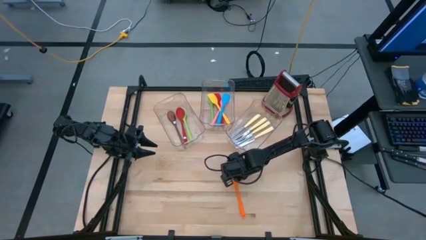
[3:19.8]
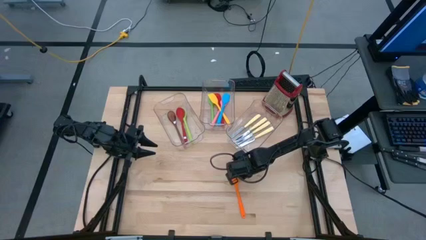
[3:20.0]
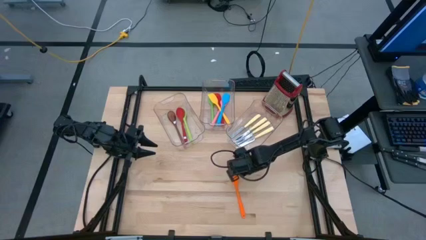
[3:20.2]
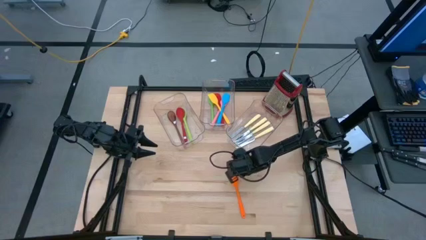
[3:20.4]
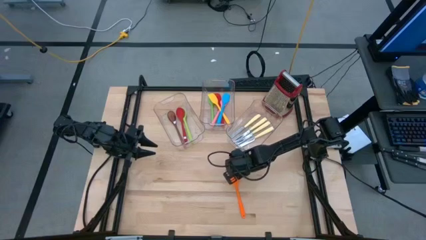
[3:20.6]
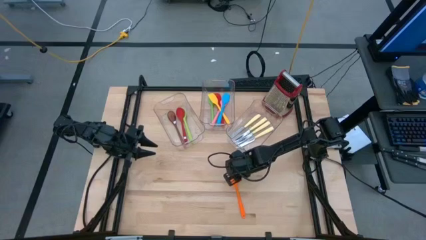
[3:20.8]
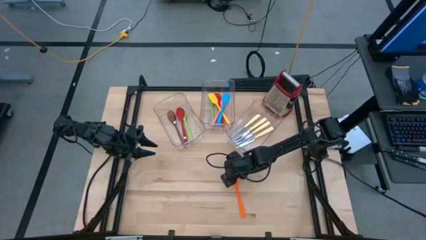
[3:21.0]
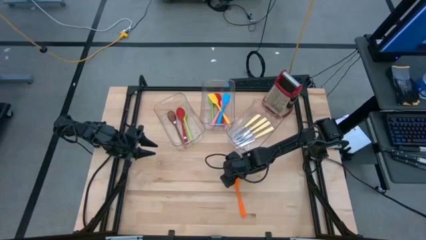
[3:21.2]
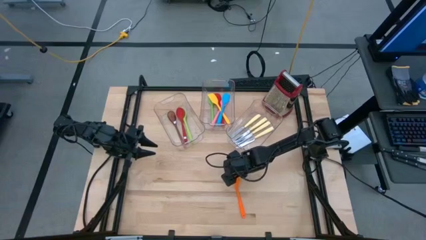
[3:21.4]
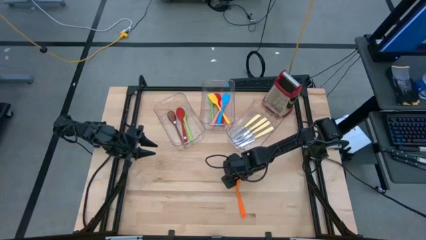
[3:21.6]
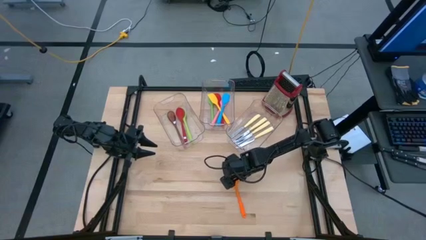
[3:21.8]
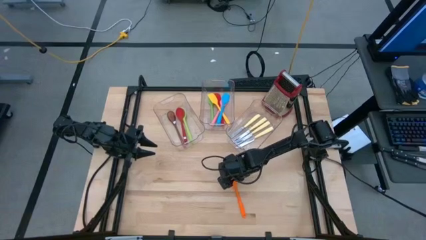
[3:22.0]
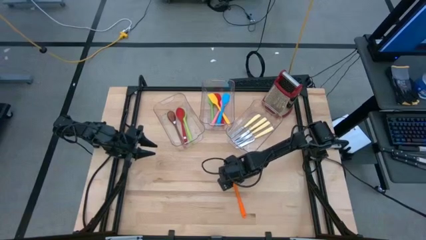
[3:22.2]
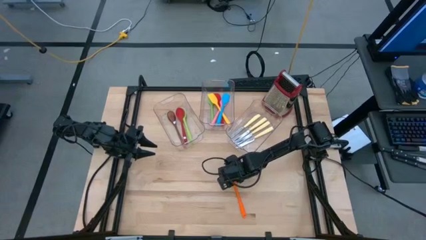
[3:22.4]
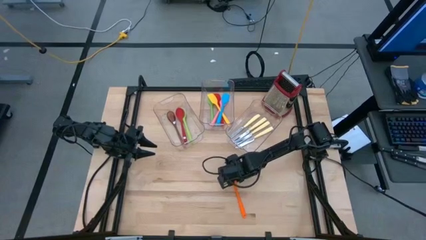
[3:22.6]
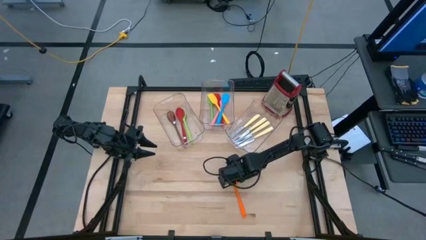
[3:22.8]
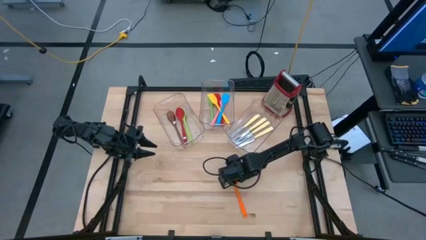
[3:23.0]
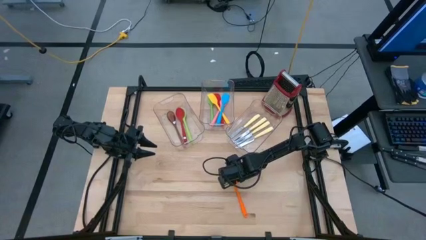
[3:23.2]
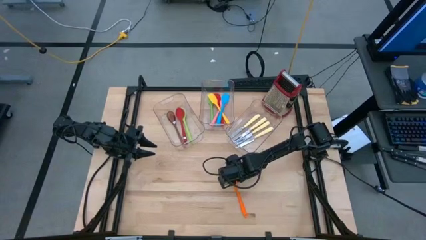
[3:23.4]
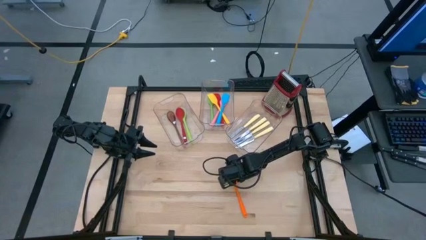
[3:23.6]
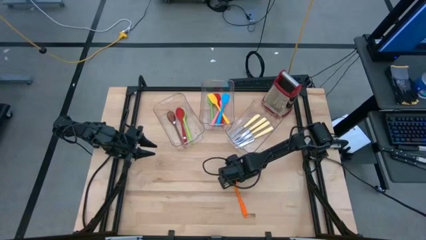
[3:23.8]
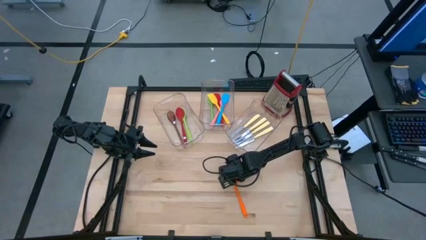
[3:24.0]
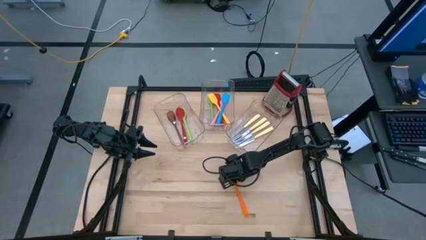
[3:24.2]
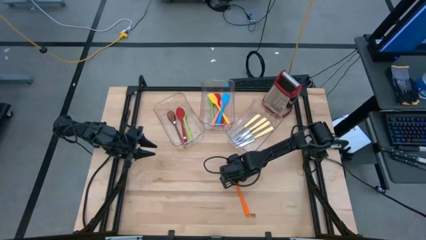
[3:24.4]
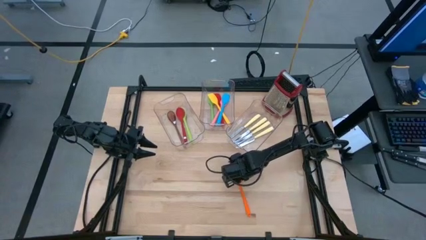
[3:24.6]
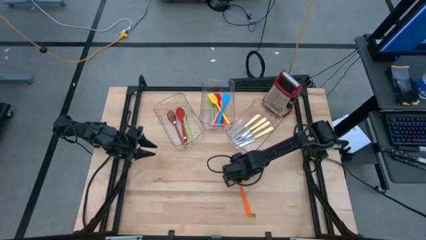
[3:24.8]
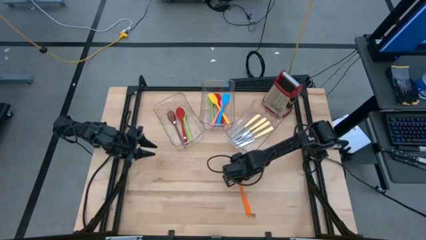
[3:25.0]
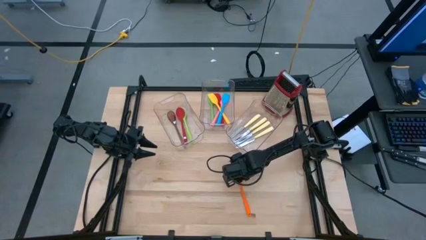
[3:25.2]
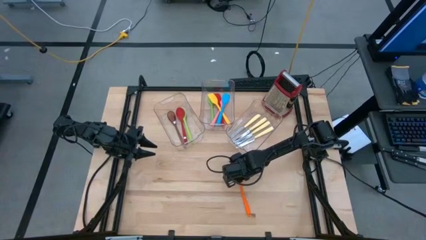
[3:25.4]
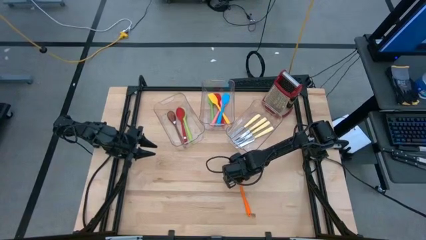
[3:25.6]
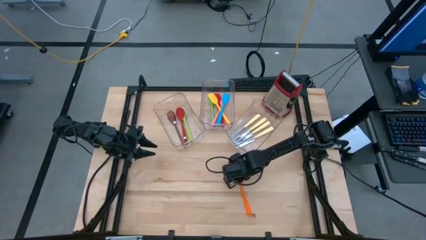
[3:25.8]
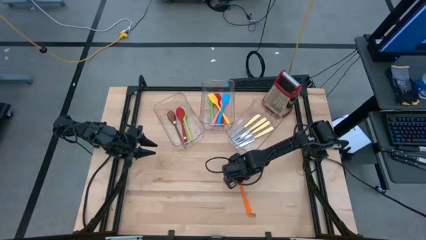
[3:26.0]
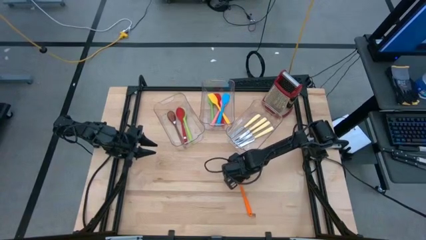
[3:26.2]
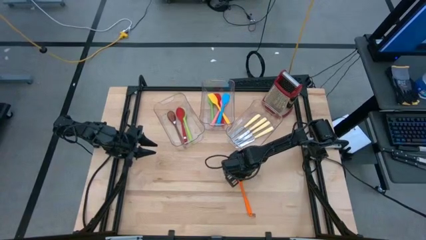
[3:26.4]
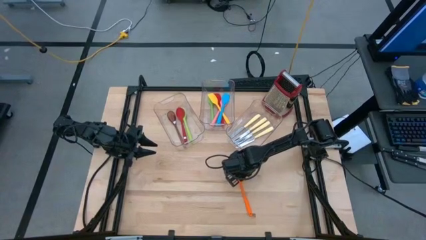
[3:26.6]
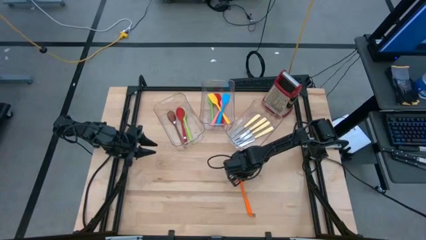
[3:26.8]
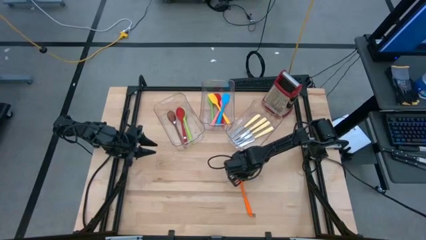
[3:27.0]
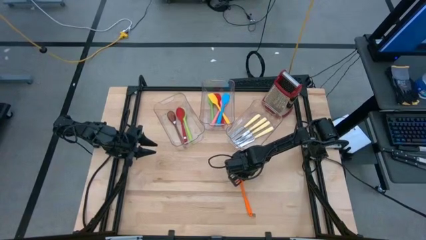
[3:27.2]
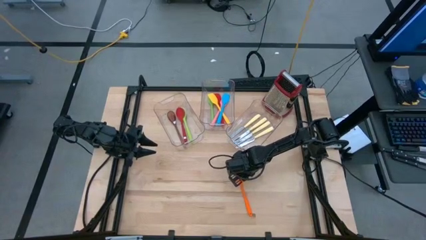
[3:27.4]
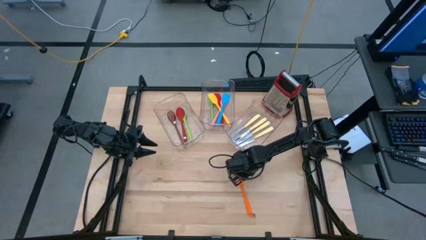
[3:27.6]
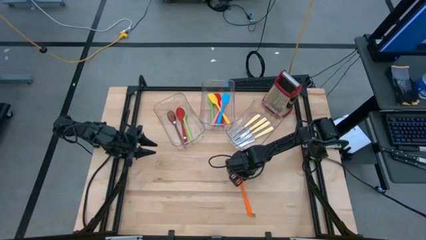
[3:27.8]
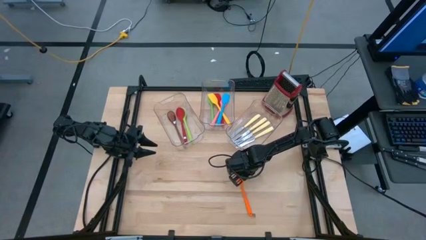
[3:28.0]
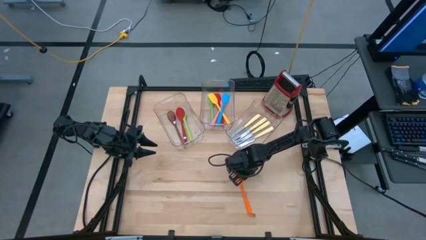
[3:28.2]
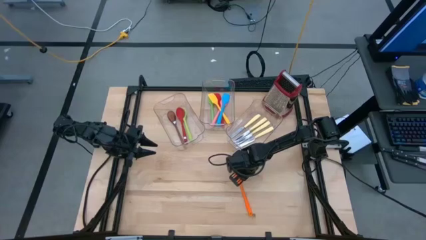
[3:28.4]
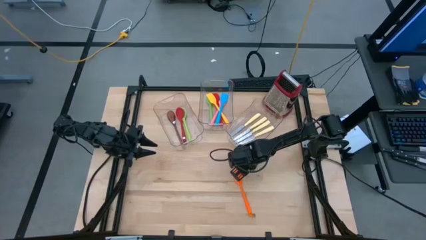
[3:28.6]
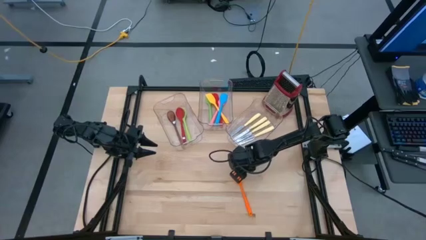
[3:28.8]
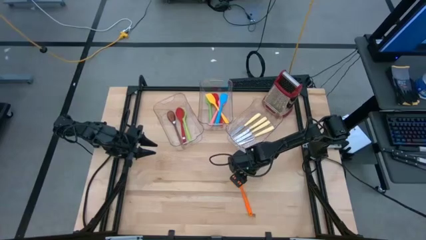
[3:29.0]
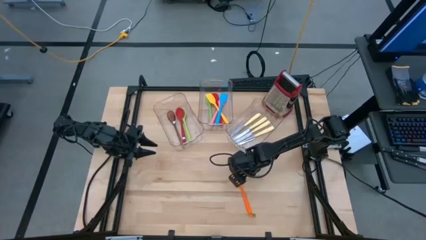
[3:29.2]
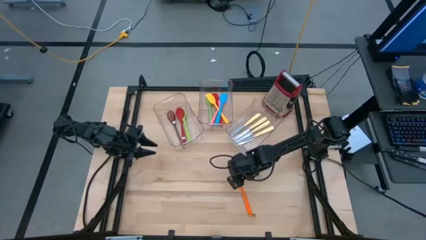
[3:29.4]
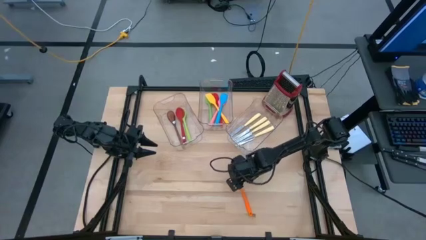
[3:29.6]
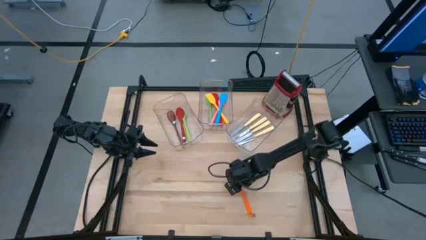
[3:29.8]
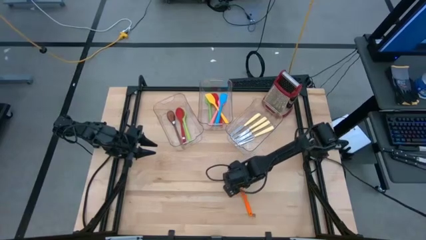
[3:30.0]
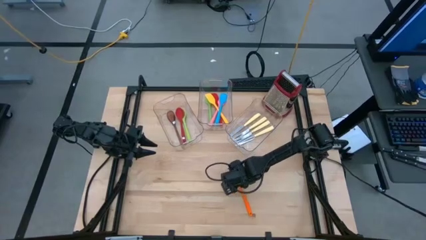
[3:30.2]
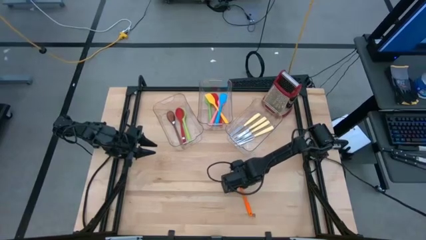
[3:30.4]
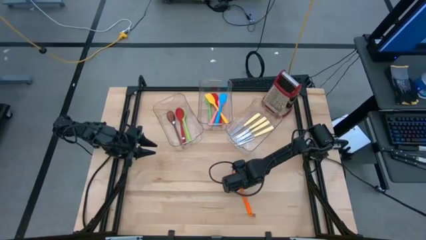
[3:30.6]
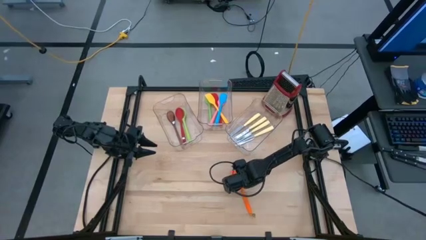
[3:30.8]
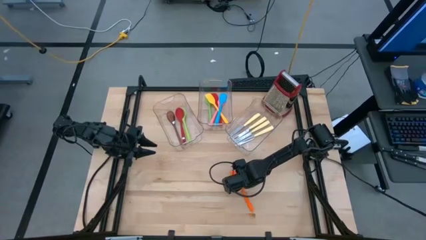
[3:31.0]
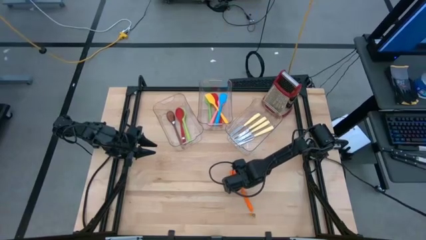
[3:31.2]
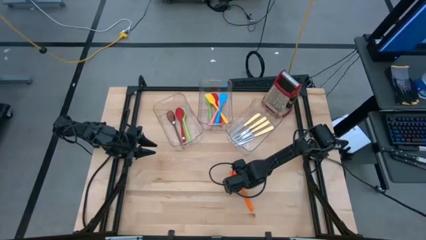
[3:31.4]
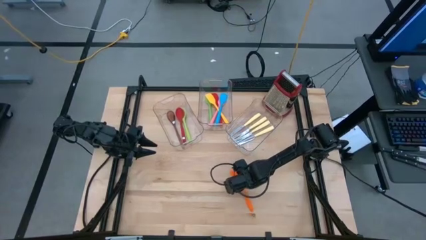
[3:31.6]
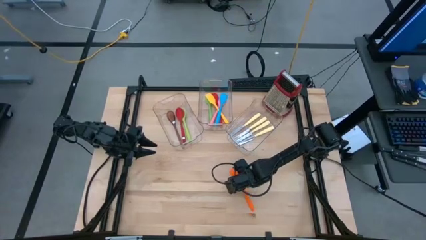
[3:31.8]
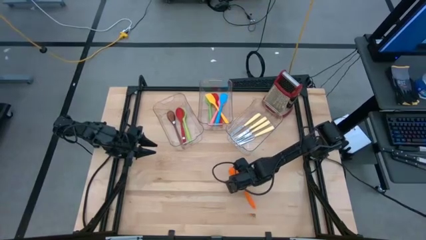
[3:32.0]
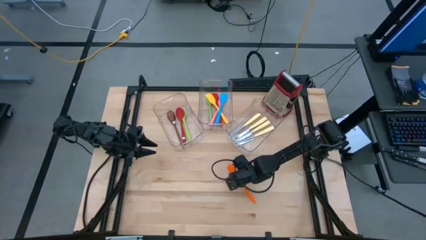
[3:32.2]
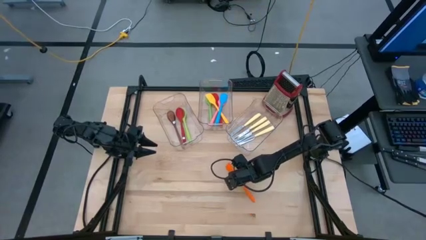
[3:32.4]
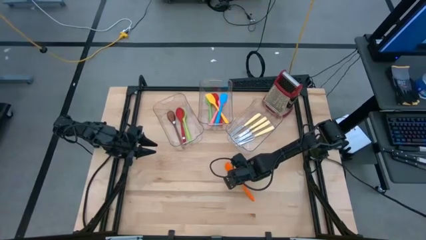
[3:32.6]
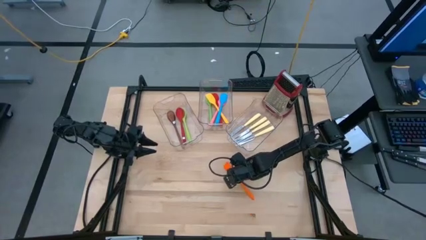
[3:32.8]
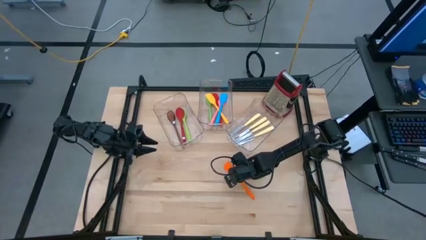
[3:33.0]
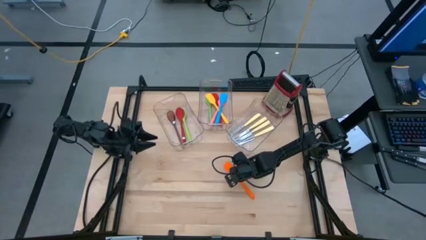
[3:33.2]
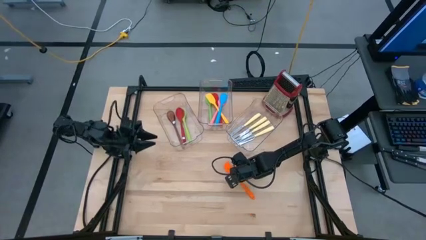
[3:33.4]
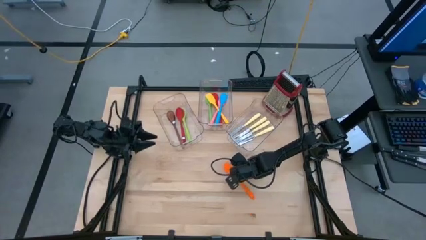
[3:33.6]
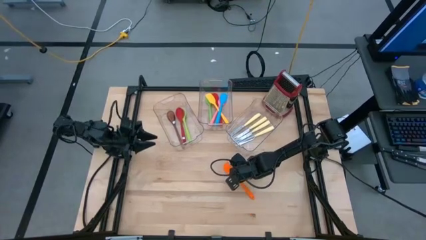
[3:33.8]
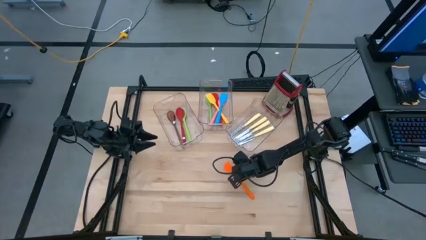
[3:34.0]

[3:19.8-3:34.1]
Task: Pick & Place Kitchen Items
Put the orange spatula into the middle transparent bin

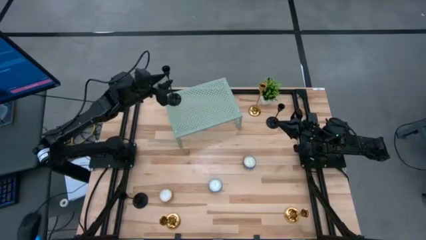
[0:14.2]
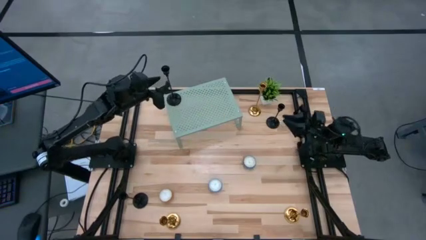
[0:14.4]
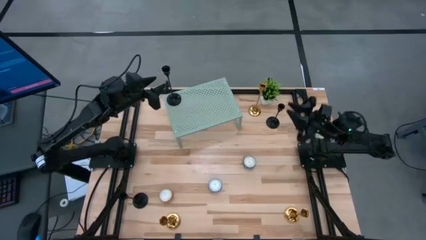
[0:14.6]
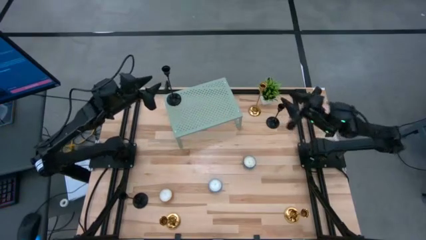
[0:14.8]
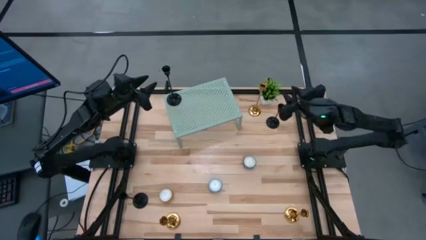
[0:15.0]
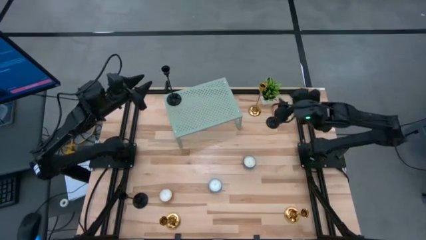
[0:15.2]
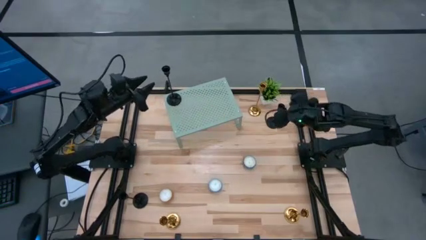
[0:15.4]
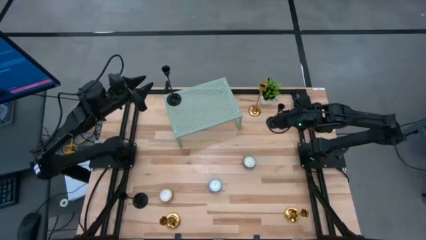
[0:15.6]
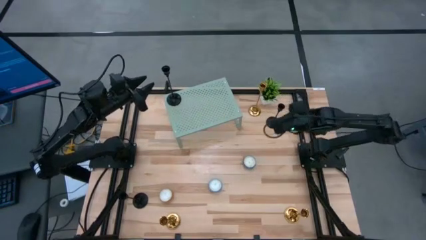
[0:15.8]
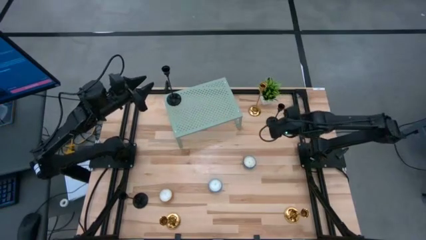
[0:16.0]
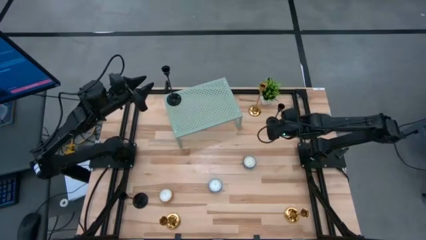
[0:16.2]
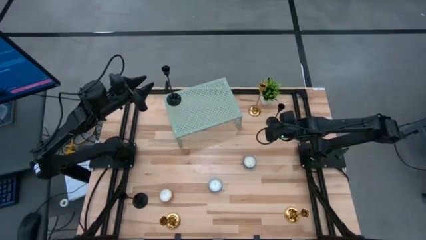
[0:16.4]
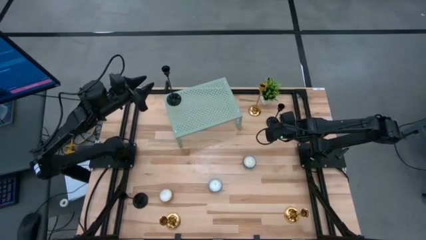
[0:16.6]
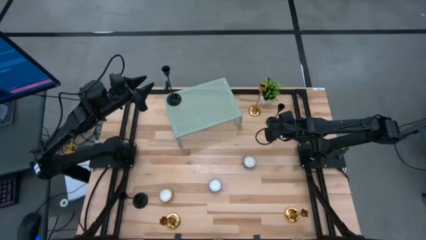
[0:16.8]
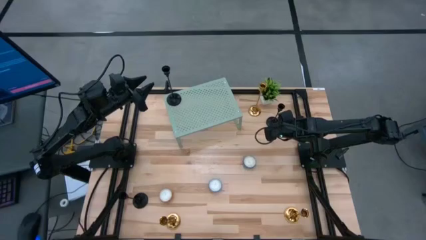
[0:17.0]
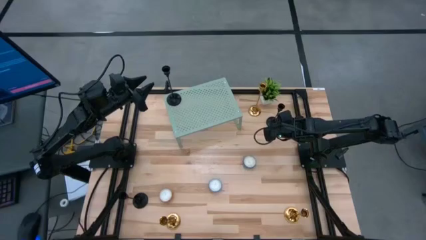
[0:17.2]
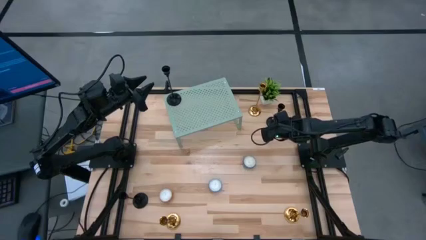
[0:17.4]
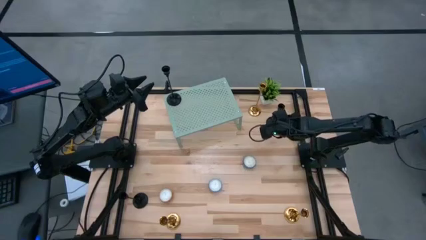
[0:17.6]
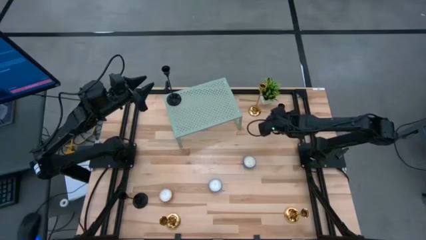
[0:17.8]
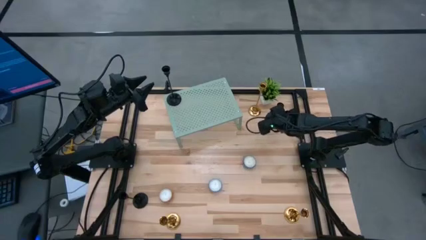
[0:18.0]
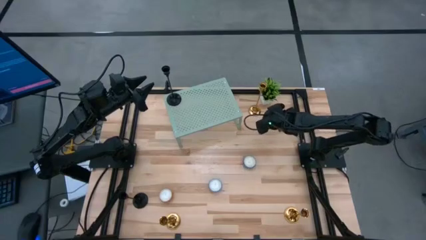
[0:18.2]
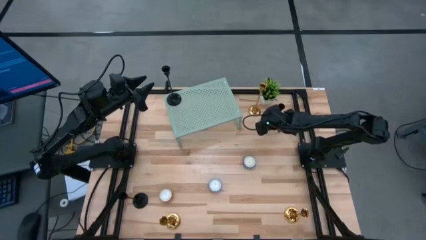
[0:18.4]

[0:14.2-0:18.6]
Task: Pick & Place candle stick holders
Put the top black candle holder on the shelf aligned with the other black candle holder
